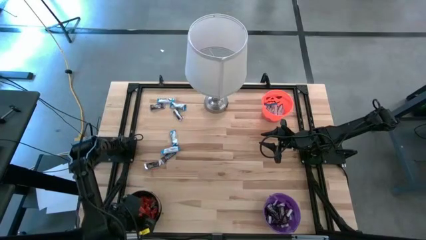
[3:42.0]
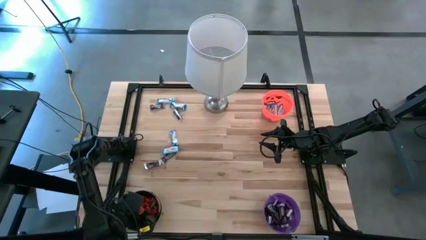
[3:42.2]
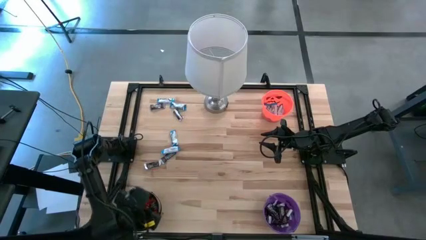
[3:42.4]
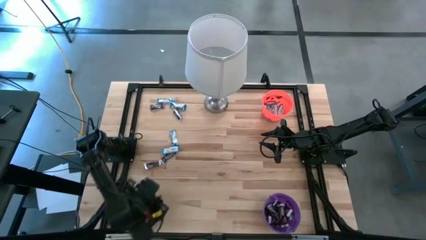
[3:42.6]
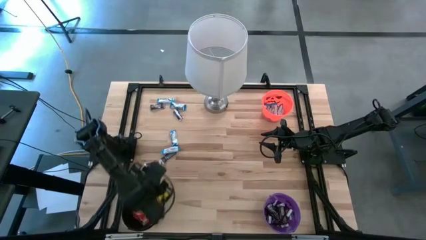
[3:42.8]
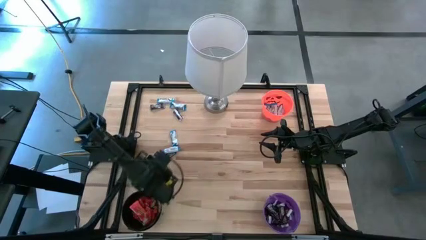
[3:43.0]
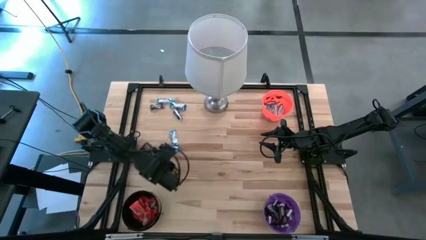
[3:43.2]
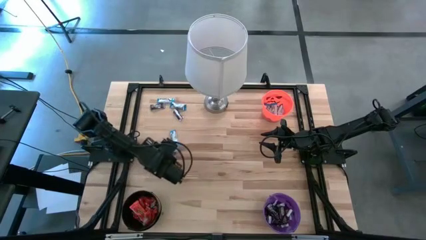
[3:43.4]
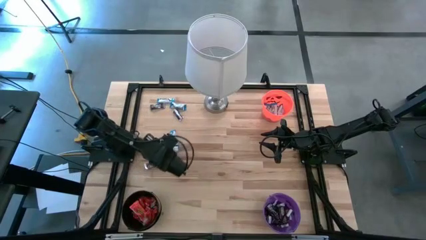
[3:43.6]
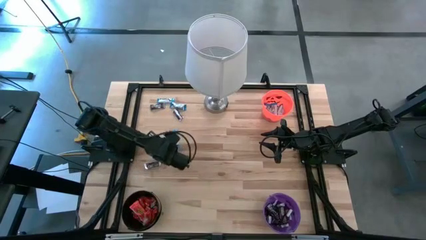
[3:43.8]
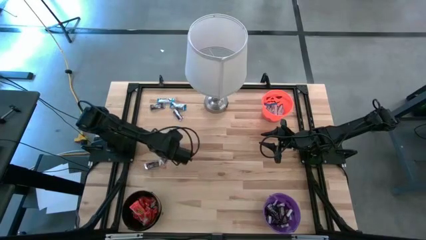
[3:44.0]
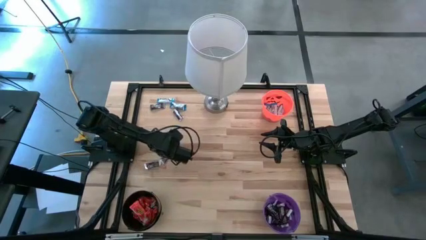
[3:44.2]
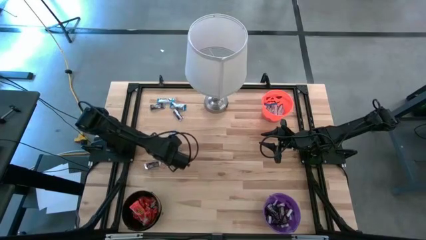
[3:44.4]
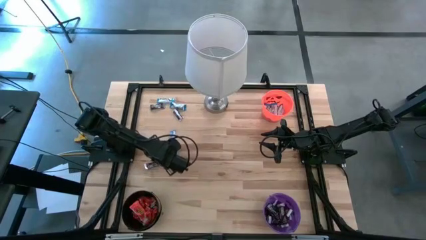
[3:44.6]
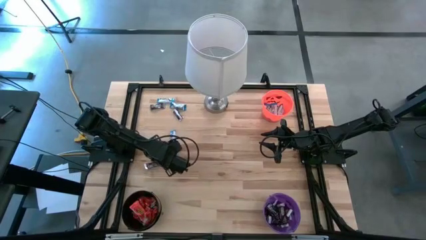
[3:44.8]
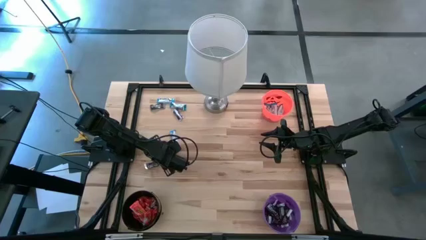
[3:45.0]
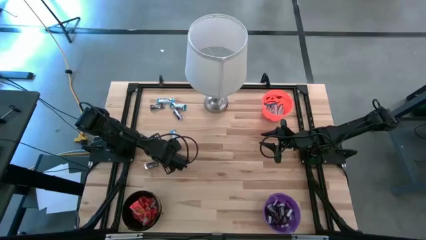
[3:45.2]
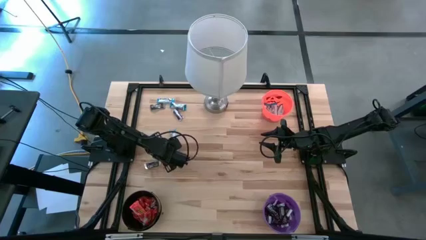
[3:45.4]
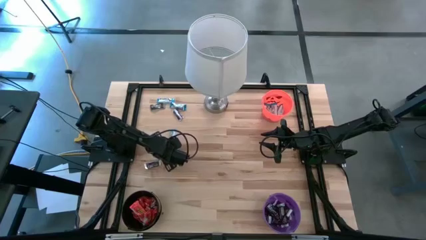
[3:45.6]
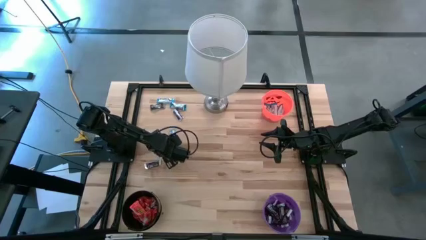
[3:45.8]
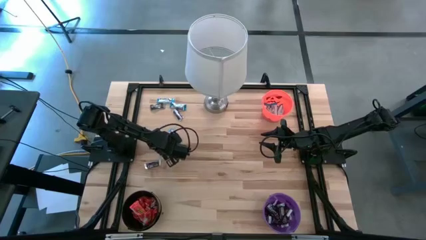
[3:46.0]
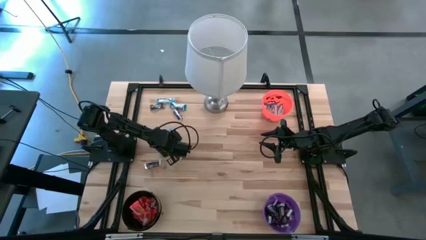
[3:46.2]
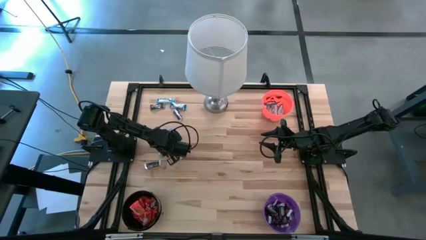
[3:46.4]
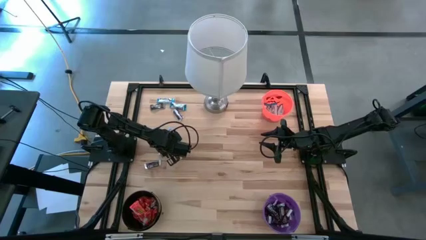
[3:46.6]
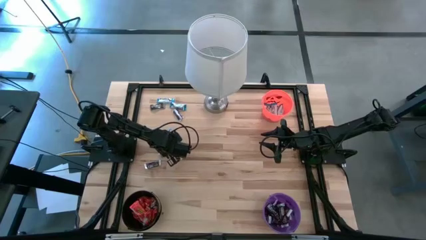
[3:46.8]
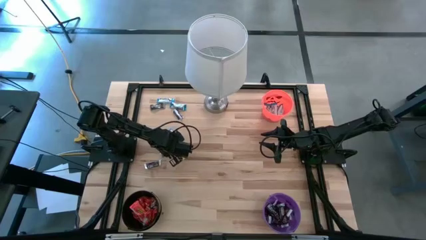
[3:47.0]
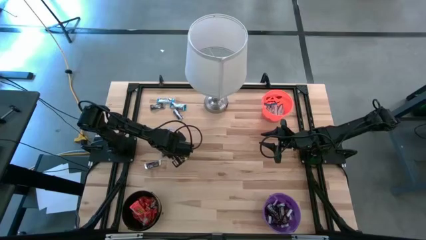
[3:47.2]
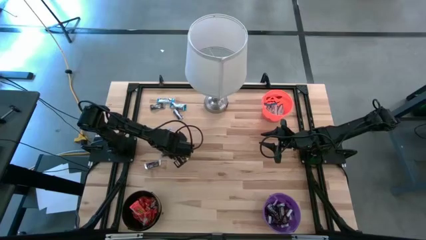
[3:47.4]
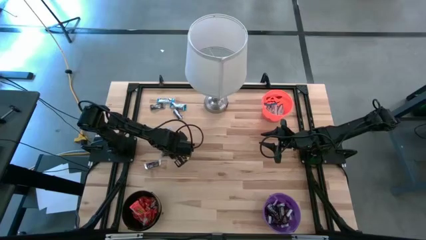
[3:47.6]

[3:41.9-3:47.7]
Task: Sort candy
Put the white chocolate bar into the orange bucket

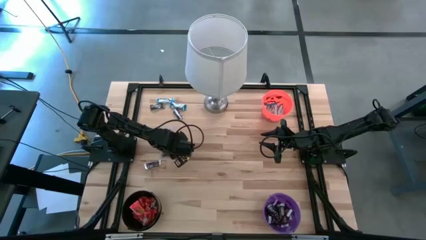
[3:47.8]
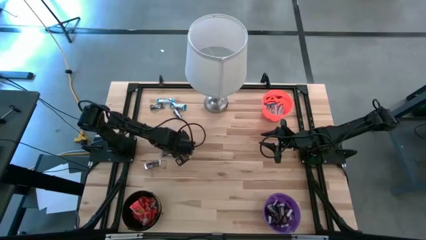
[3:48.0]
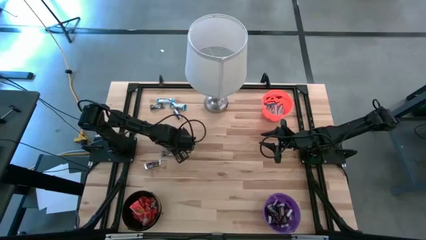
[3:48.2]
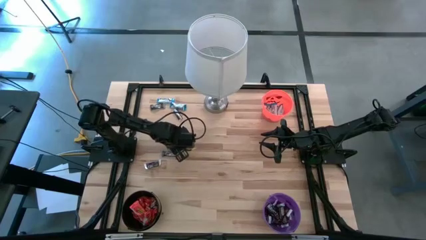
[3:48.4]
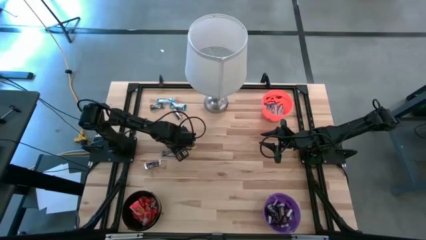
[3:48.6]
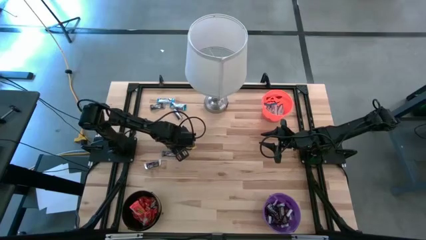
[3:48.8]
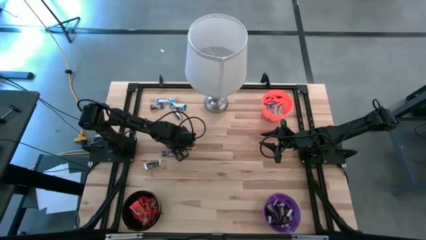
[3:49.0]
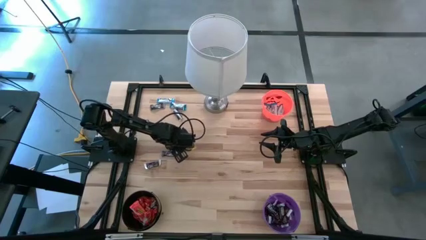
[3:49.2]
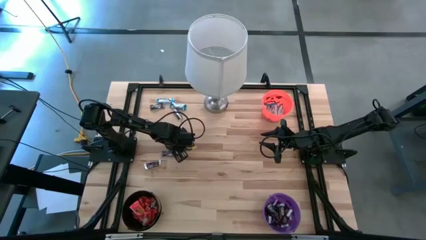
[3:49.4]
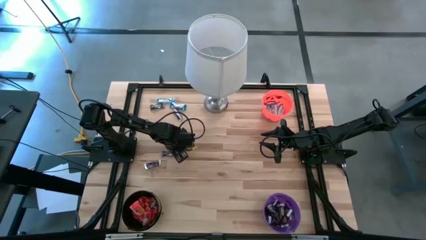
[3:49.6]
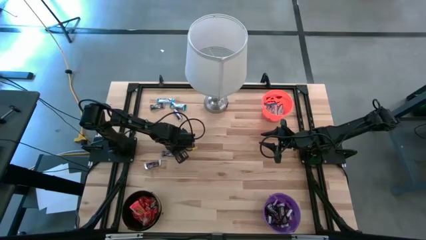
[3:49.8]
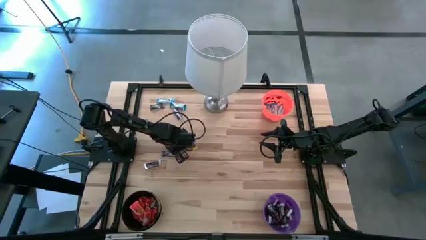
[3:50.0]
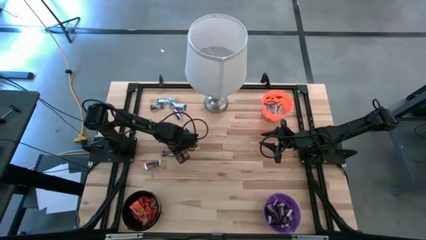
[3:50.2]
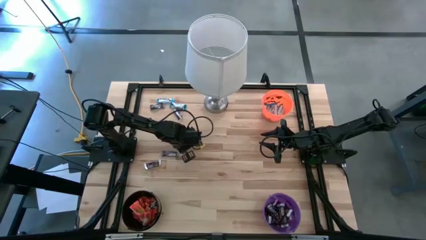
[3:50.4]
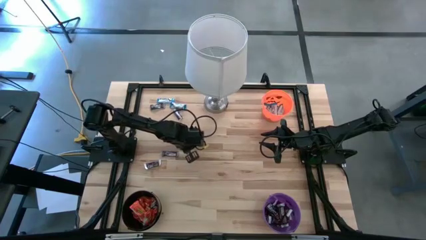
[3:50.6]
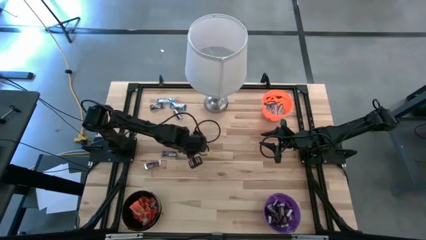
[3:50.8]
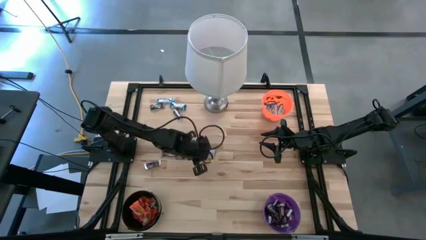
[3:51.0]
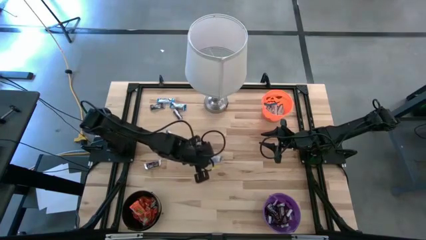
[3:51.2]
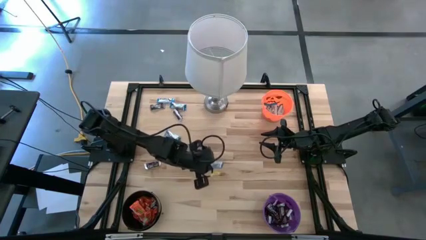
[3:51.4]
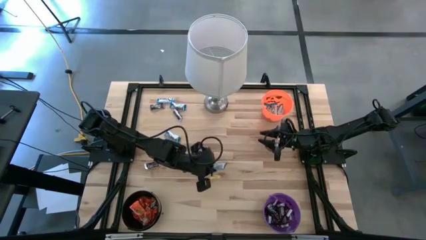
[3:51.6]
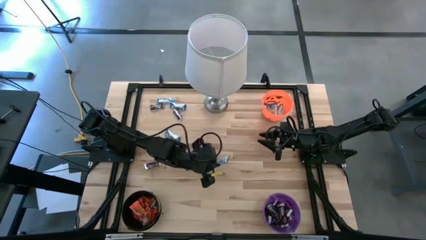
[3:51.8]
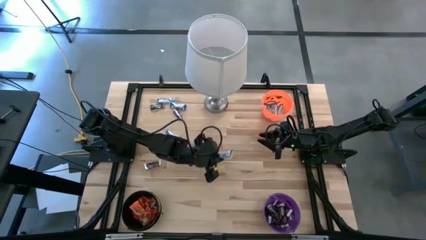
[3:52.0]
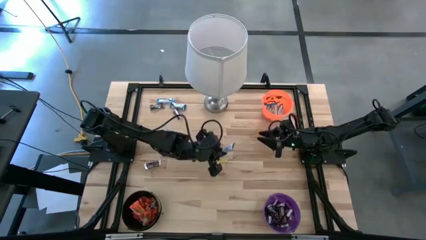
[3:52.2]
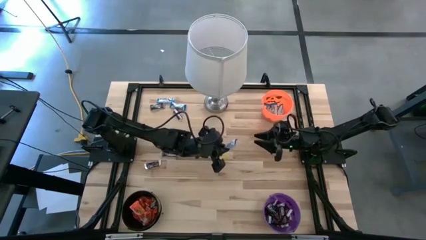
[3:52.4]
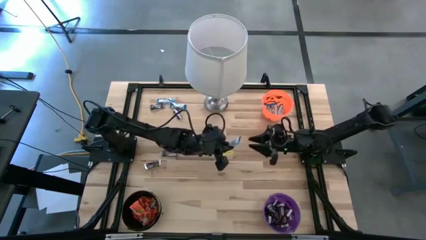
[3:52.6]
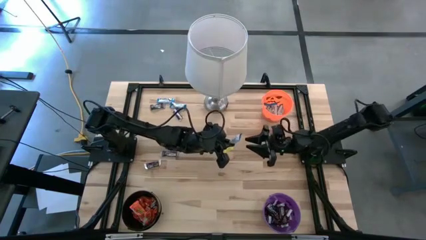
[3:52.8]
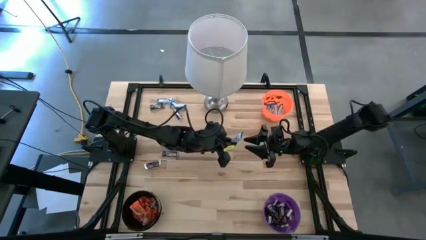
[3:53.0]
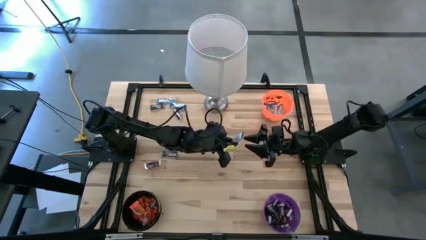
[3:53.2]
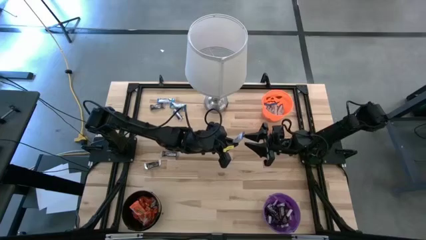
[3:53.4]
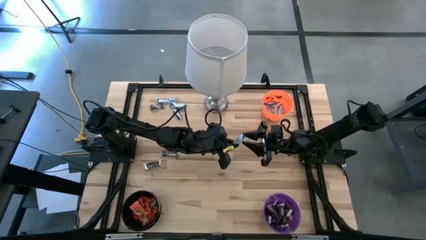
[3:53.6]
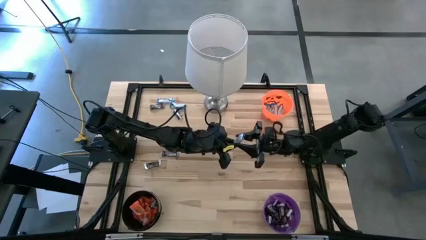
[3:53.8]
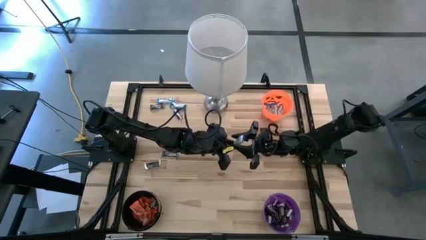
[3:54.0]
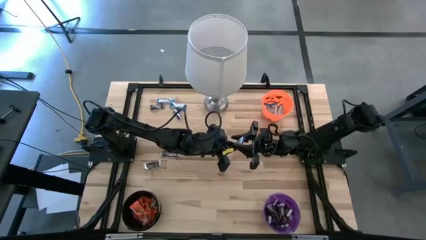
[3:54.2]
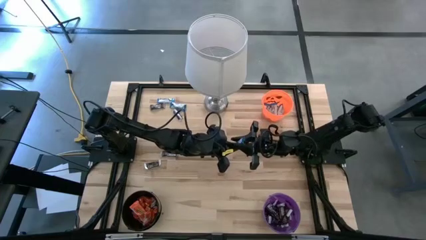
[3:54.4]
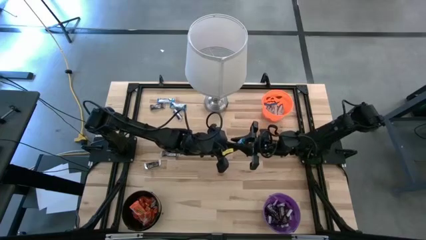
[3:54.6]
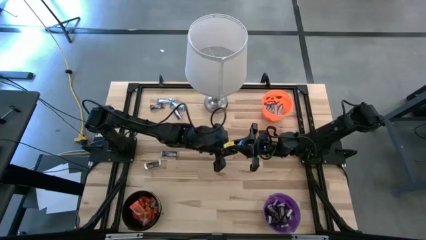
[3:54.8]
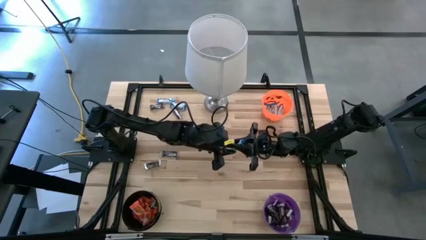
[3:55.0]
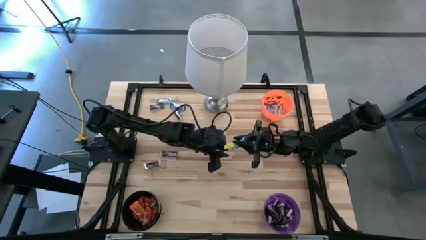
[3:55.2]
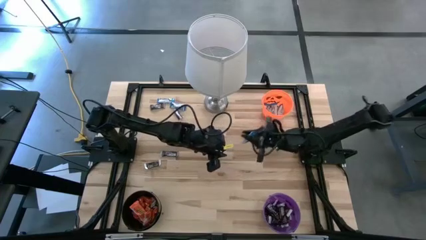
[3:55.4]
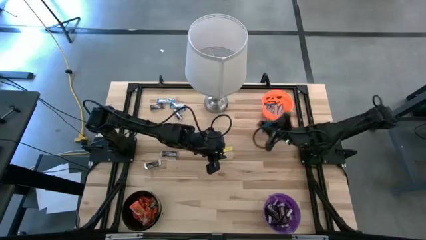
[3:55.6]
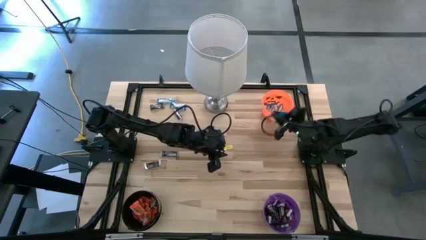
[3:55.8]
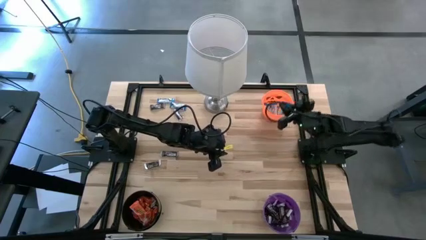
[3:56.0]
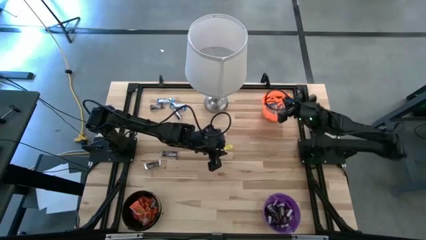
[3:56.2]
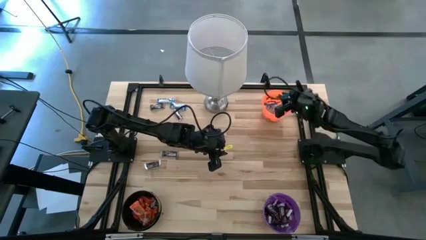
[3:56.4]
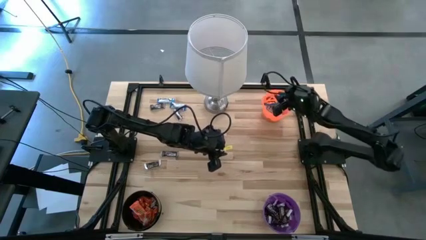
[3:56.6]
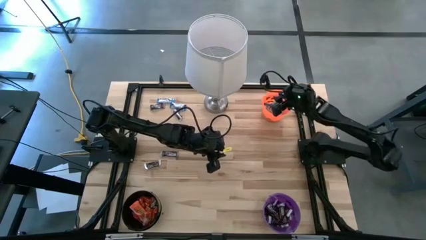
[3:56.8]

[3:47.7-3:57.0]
Put the white chocolate bar into the orange bucket

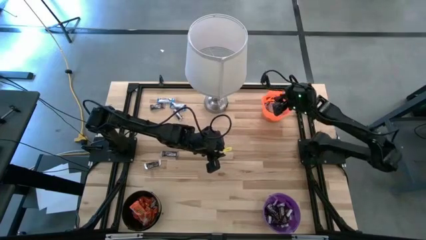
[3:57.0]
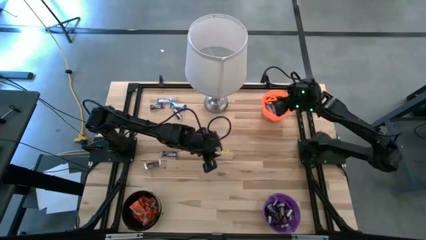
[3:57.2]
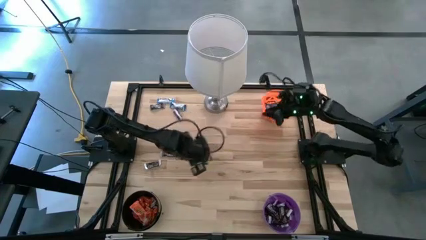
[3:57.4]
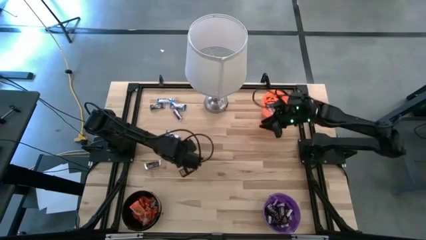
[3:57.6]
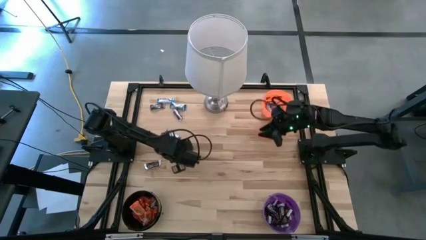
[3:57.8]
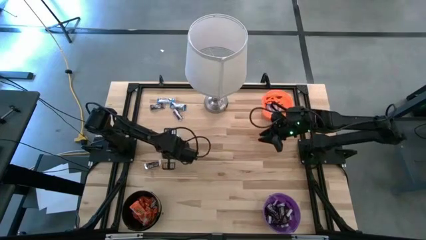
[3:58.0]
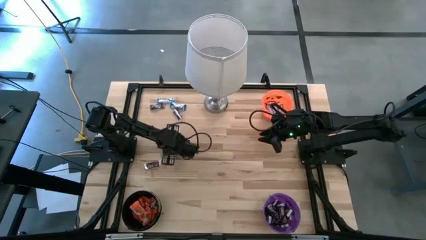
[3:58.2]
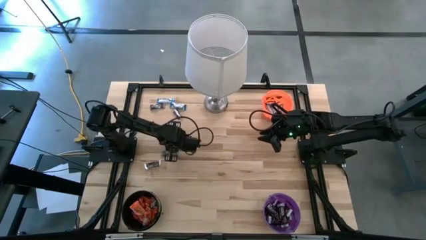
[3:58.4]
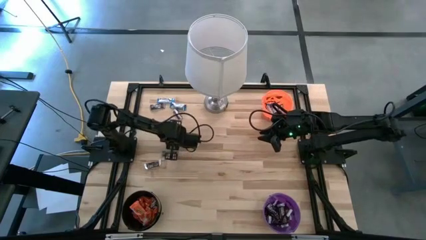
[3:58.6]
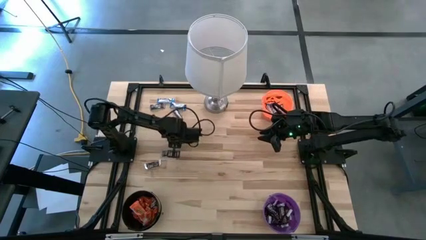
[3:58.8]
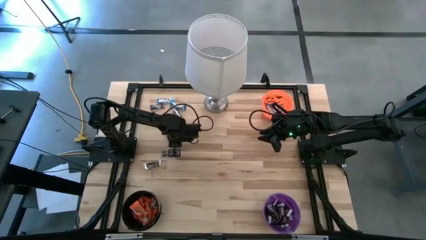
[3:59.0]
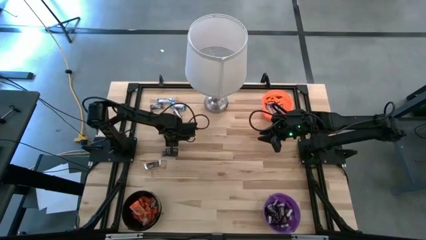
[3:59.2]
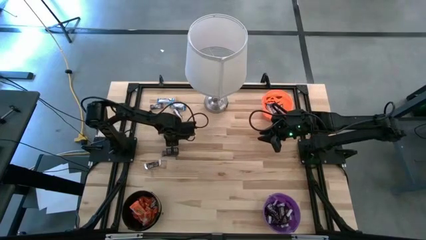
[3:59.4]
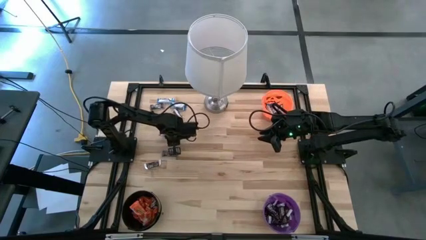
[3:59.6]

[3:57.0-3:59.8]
Put the white chocolate bar into the orange bucket
